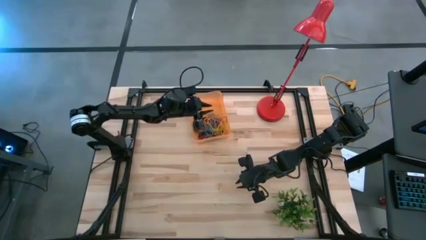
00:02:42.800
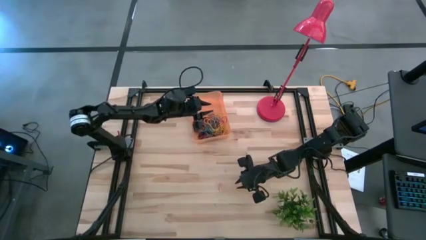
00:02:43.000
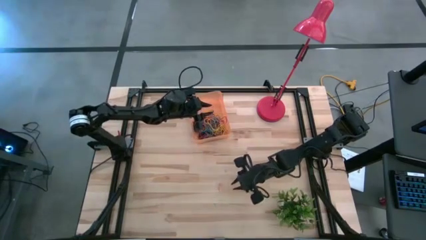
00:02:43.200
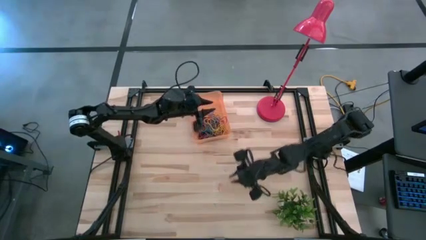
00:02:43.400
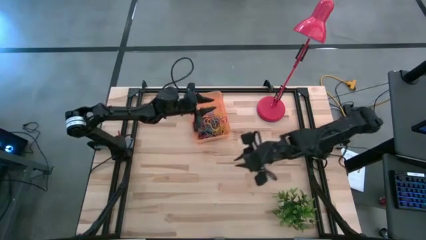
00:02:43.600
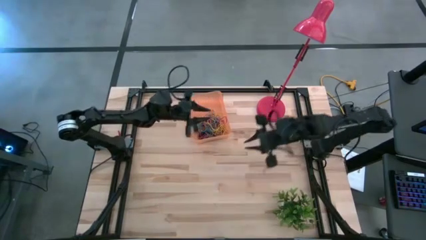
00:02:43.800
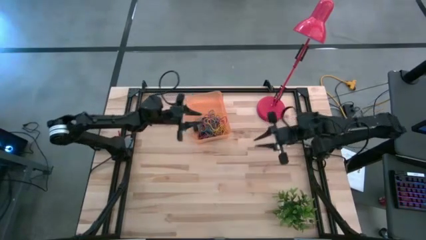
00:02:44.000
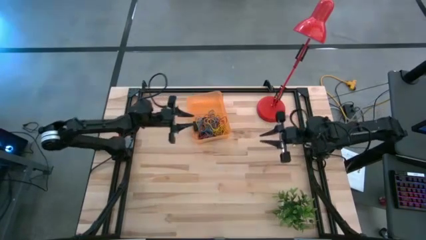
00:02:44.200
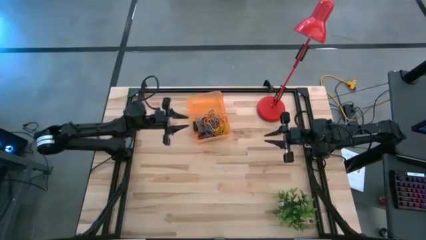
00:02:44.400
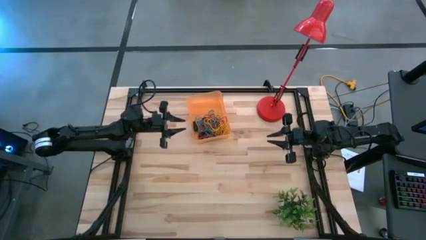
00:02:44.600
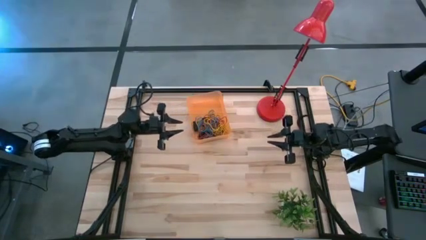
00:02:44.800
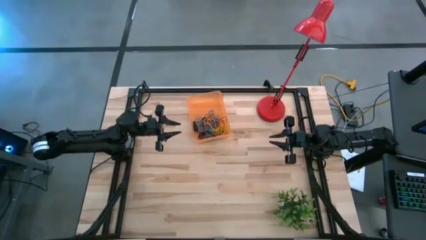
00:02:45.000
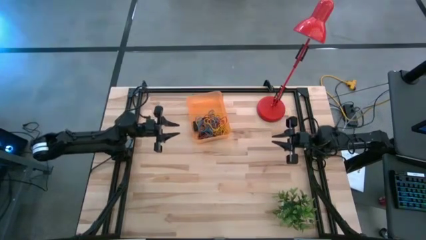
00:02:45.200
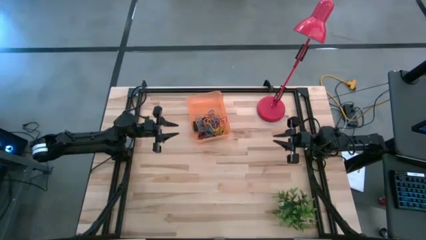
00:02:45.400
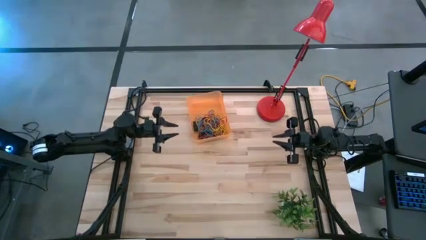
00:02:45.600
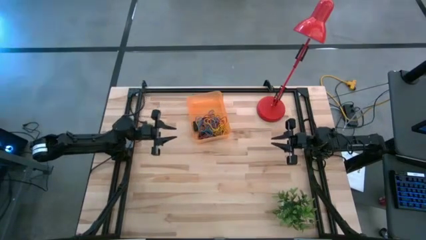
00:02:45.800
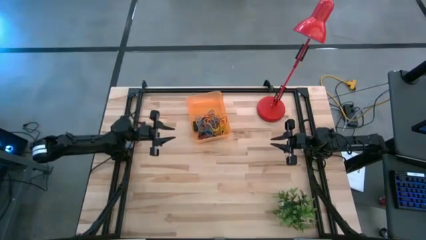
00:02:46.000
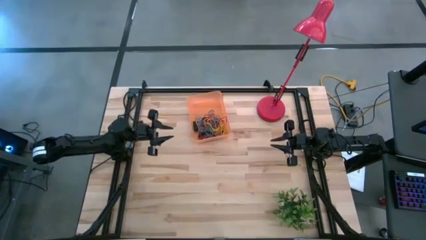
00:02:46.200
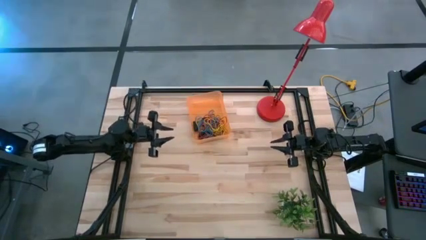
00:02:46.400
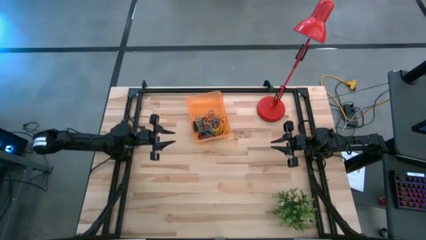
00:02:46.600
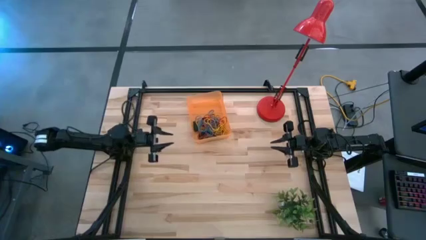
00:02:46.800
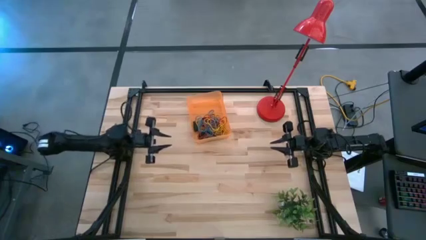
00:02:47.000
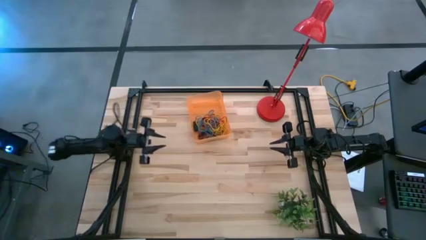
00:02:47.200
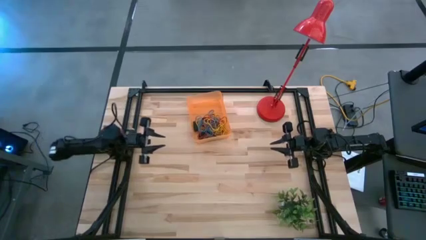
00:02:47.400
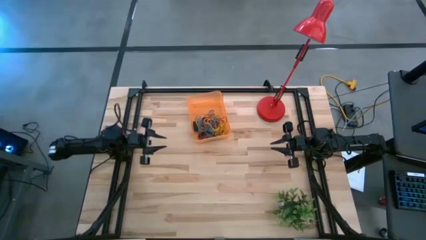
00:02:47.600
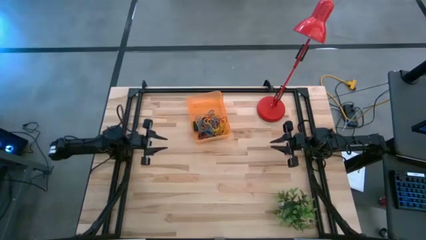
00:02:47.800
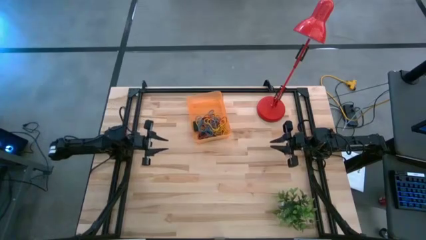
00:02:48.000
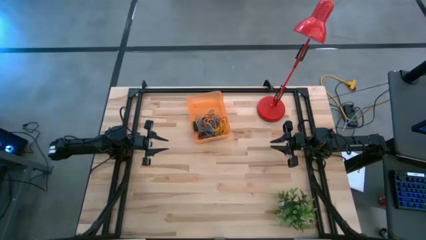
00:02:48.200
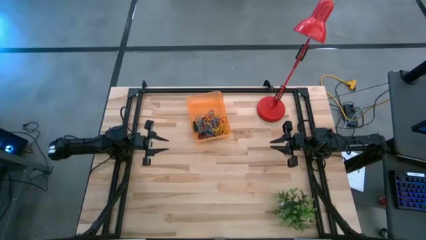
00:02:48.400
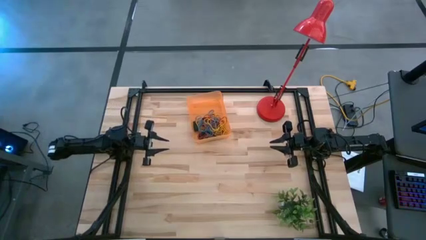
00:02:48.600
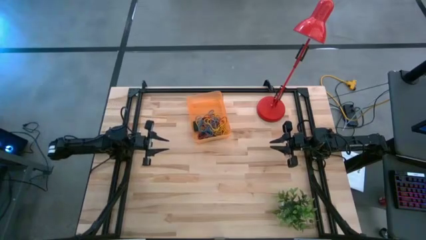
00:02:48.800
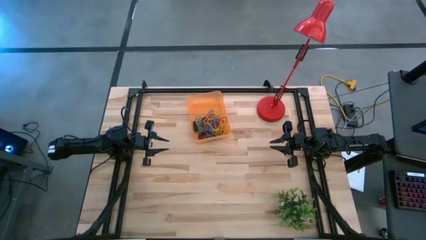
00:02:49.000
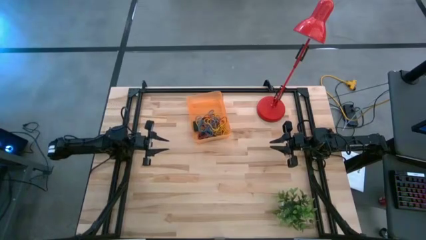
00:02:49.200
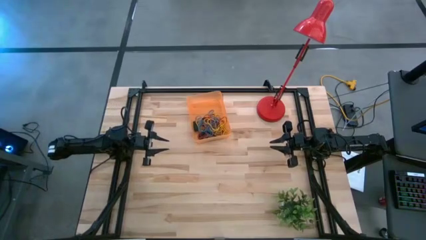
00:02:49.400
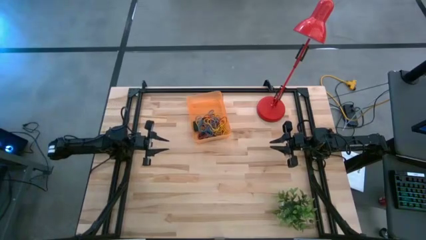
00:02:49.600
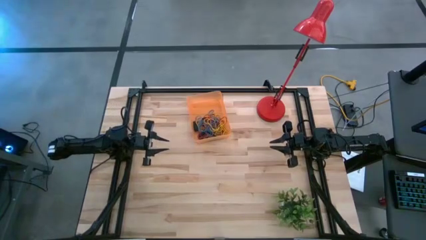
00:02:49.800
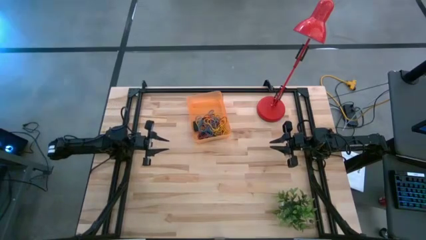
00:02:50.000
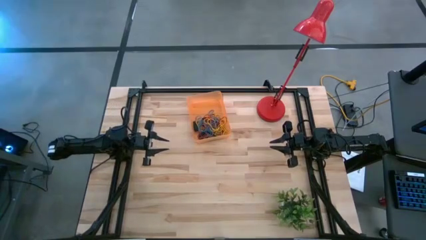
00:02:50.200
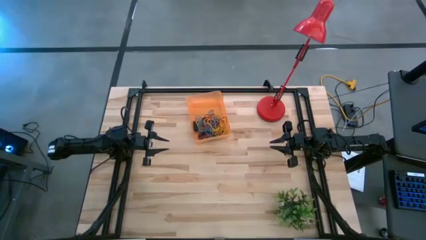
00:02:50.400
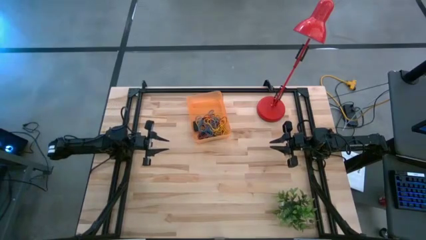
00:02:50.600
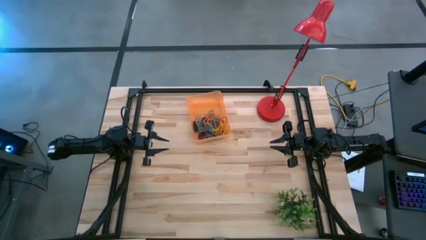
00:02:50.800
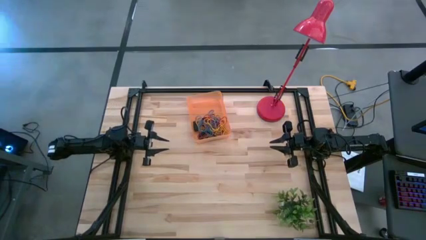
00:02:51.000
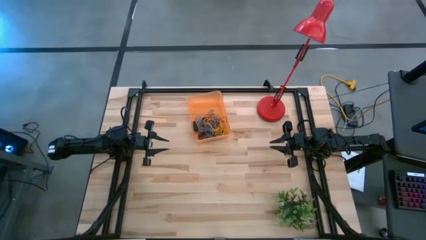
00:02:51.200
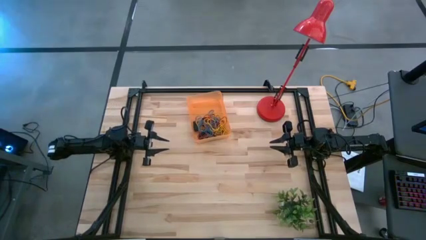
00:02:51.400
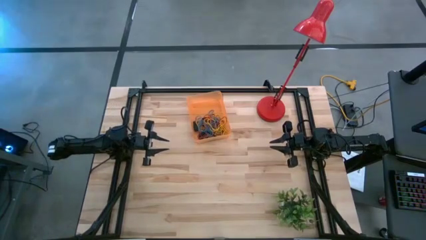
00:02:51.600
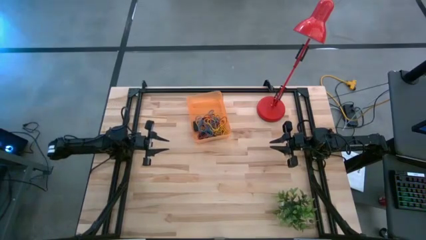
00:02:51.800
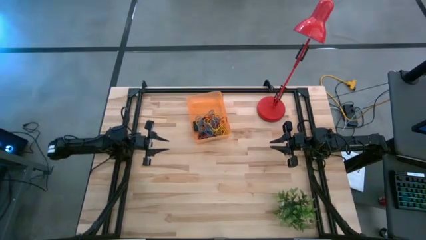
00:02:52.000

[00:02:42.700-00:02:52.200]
Task: Pick and place rubber bands into bin
Return to Home Position

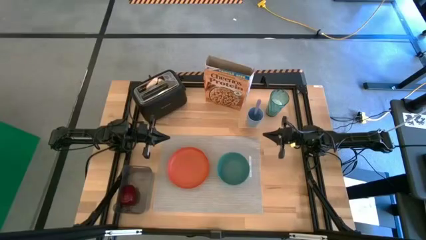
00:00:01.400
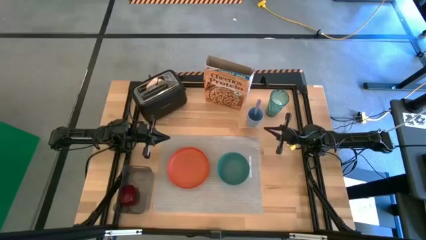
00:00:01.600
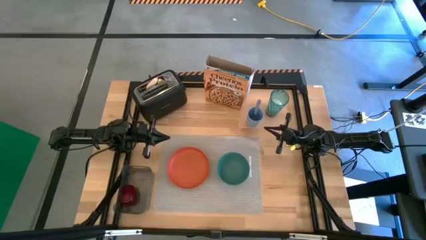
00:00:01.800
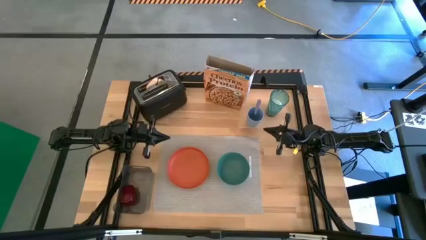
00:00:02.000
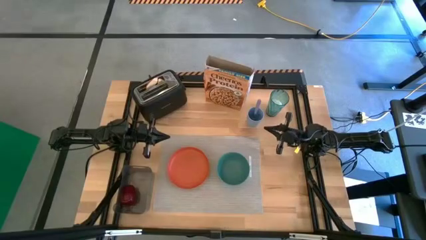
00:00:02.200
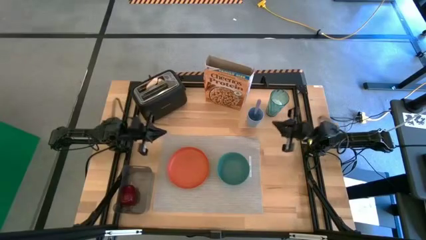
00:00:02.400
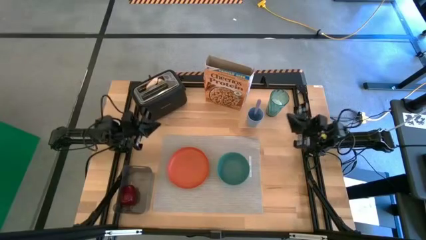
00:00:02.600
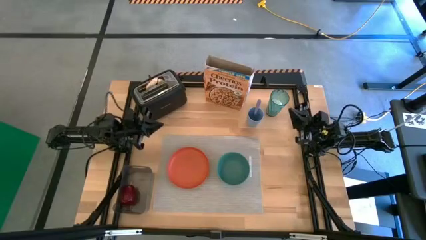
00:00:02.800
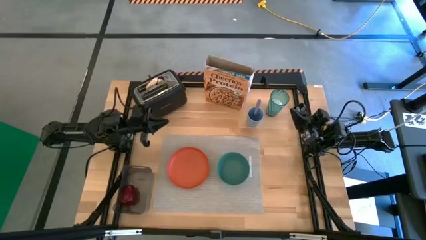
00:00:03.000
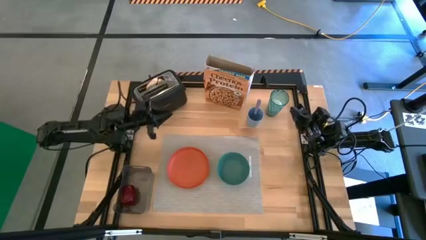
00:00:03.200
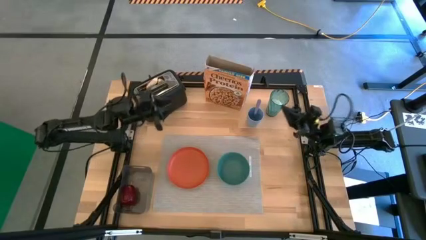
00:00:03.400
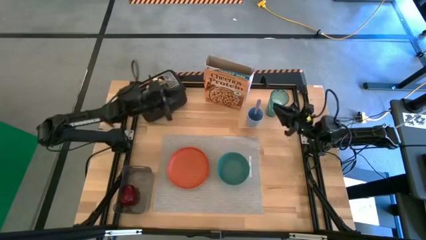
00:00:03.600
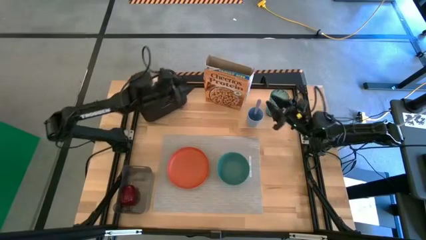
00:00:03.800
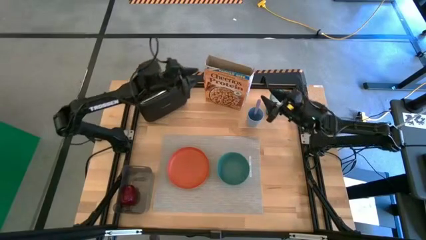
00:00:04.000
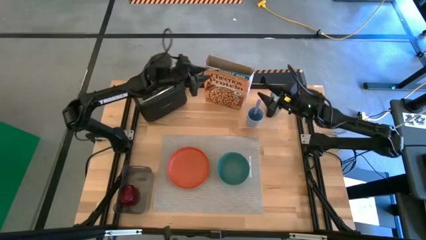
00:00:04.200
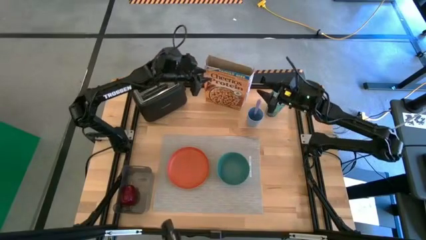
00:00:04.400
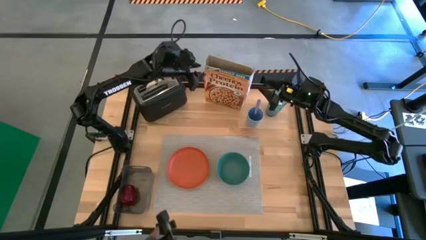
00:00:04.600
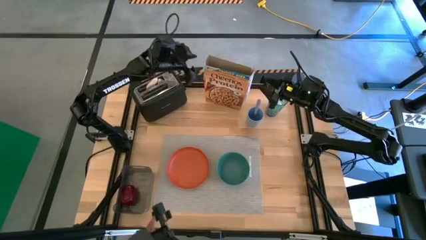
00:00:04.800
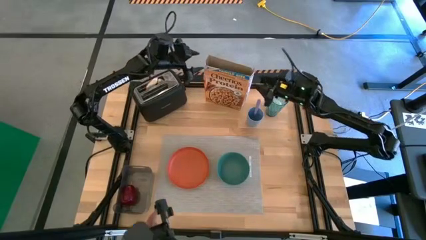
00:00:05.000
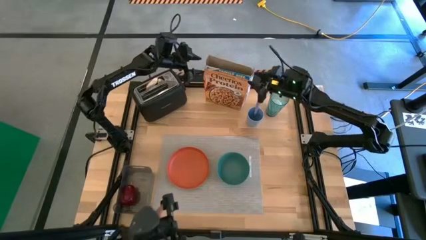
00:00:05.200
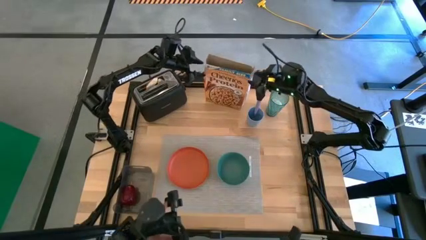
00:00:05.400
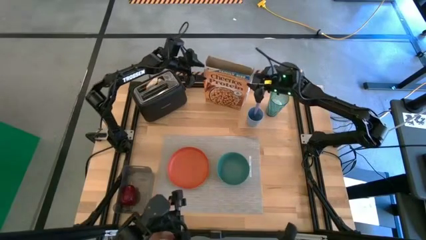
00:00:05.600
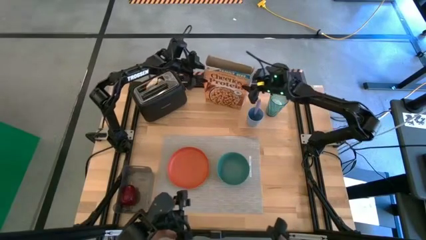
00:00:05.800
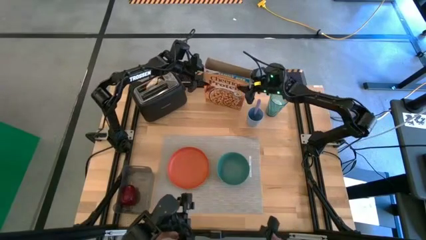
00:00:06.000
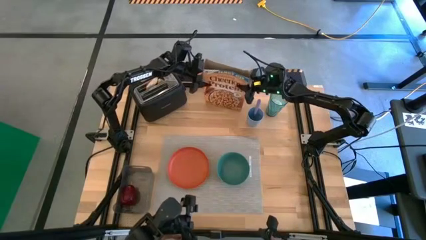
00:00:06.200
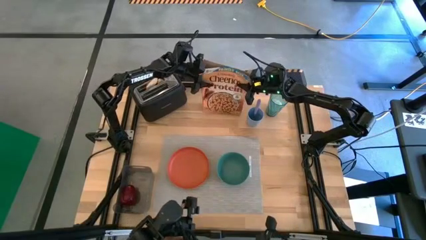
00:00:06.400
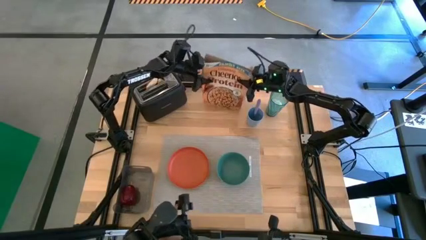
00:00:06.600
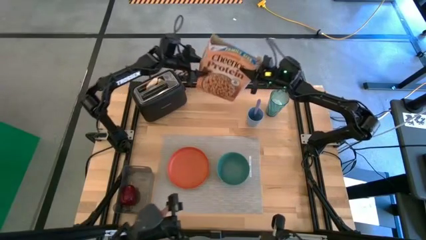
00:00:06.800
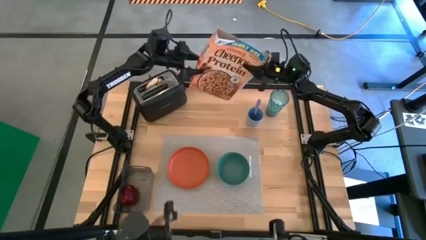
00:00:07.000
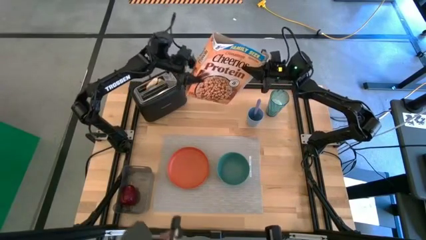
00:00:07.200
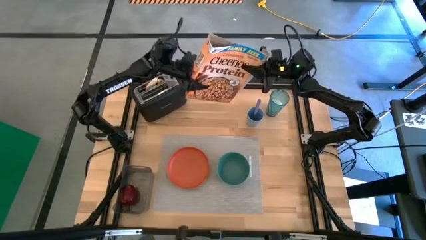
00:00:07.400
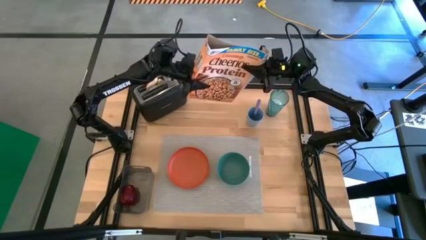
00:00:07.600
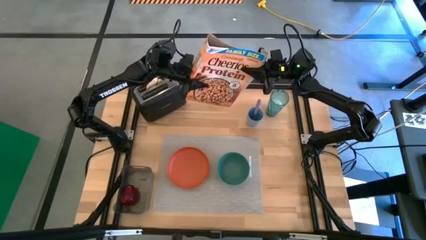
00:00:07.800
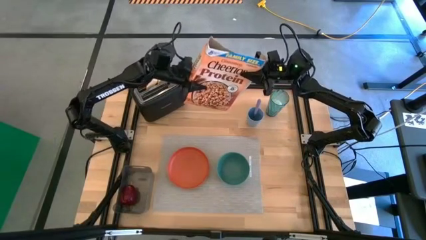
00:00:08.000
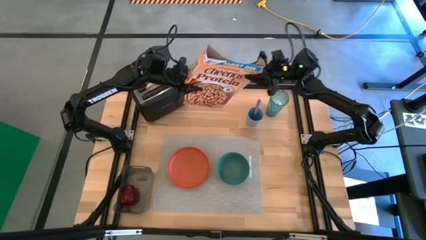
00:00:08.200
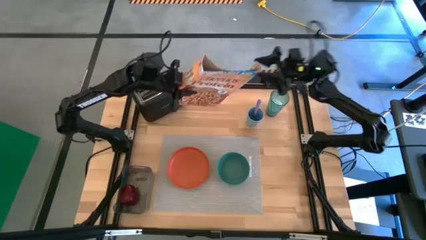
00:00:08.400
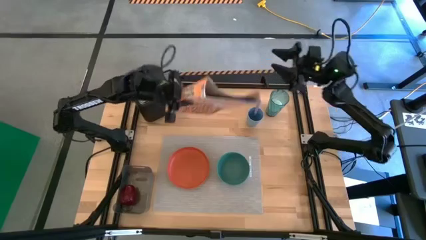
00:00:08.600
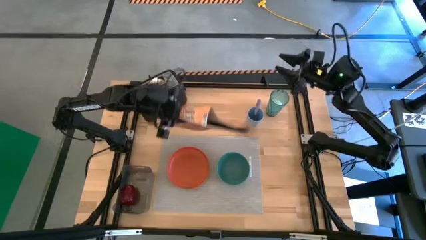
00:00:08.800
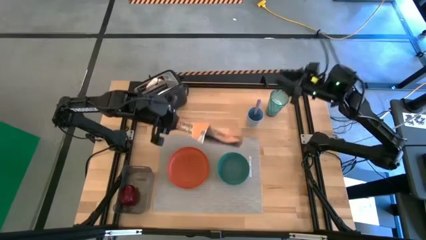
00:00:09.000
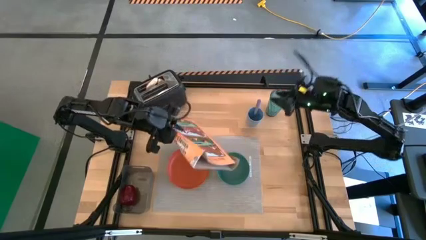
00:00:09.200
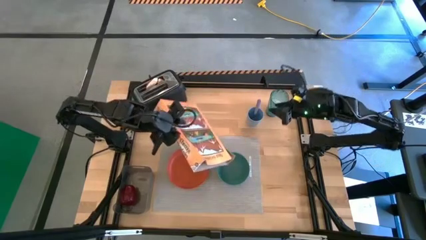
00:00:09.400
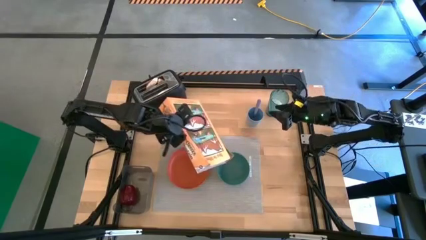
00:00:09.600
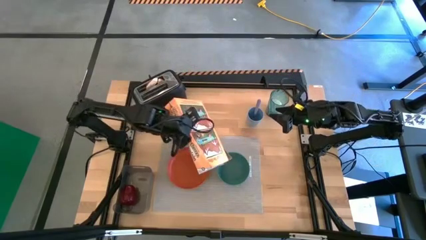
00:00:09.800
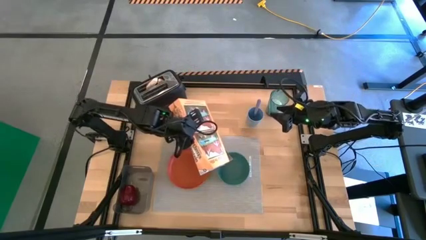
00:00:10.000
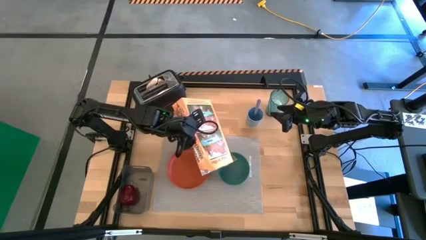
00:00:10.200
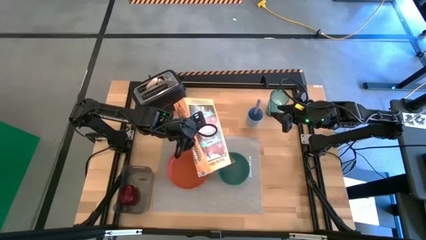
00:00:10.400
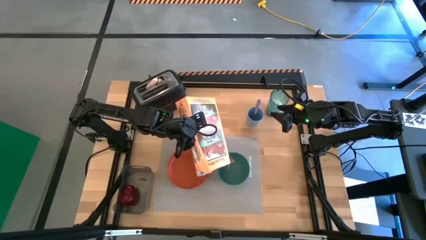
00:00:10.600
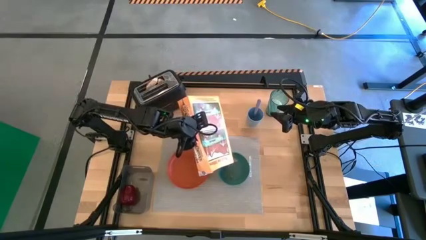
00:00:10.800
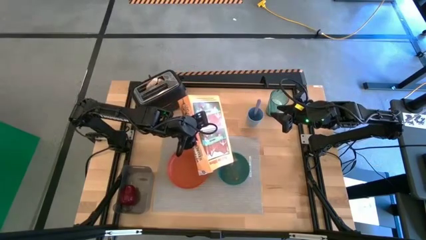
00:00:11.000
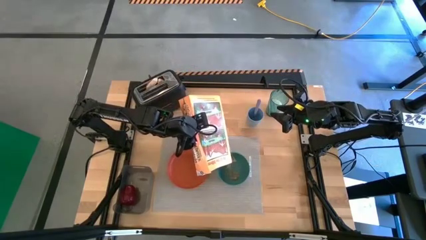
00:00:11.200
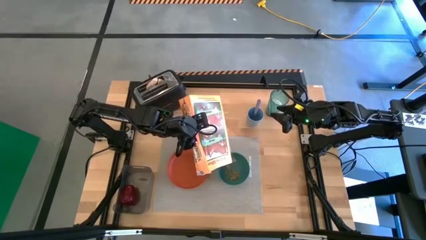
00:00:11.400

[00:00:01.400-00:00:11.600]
Task: Arrange a breakfast setting
Pour the cereal from the cereal box into a green bowl
